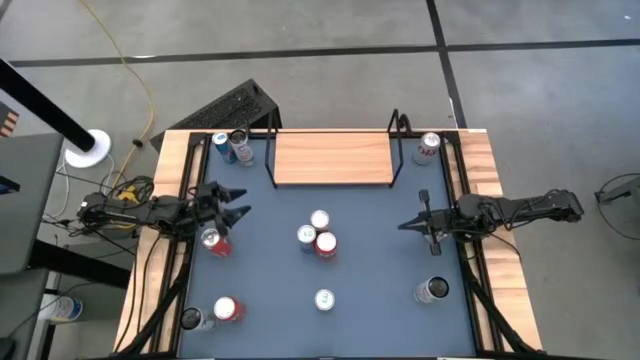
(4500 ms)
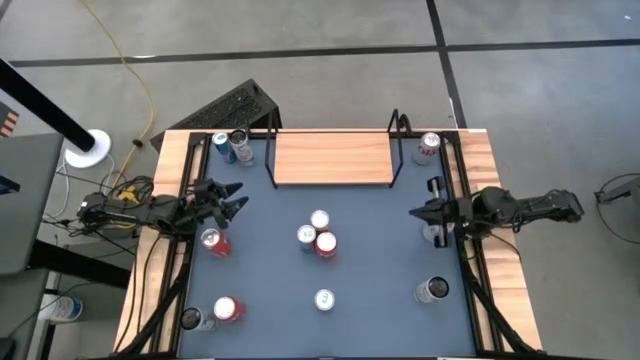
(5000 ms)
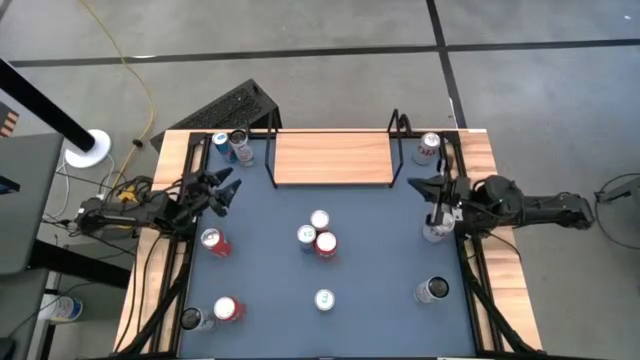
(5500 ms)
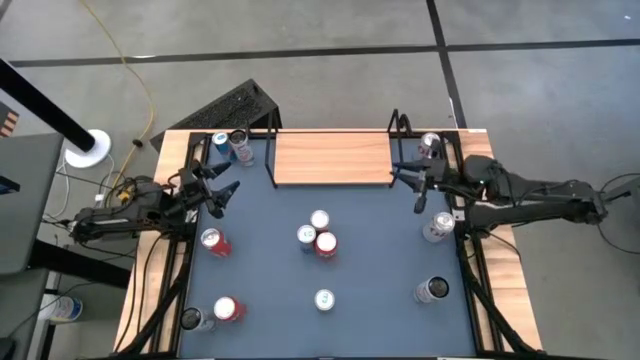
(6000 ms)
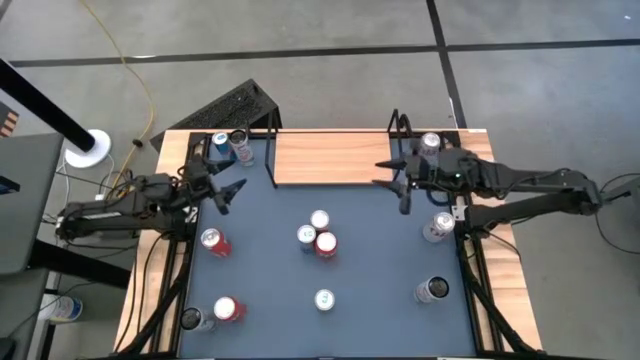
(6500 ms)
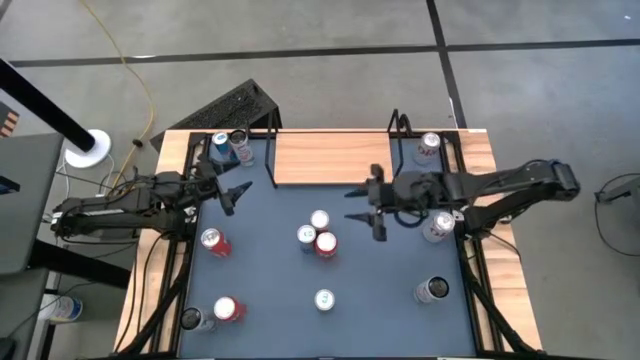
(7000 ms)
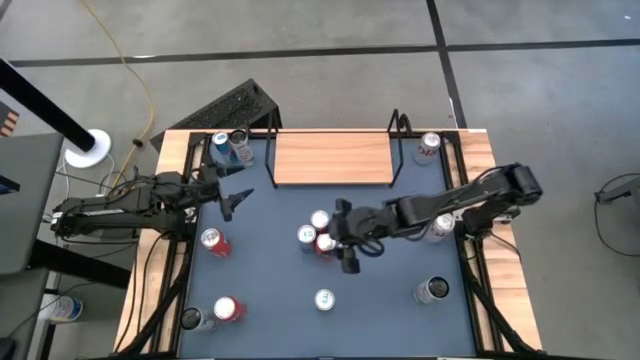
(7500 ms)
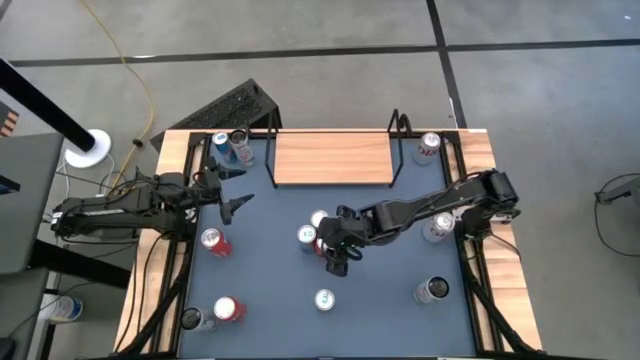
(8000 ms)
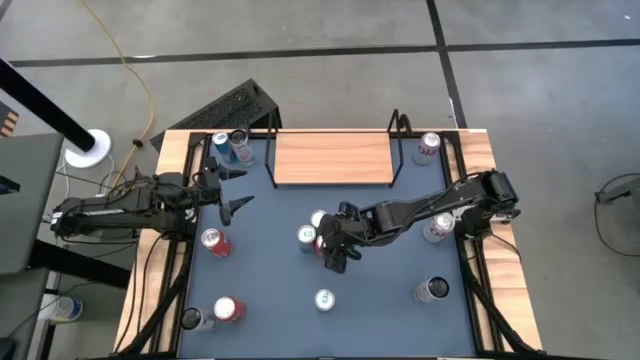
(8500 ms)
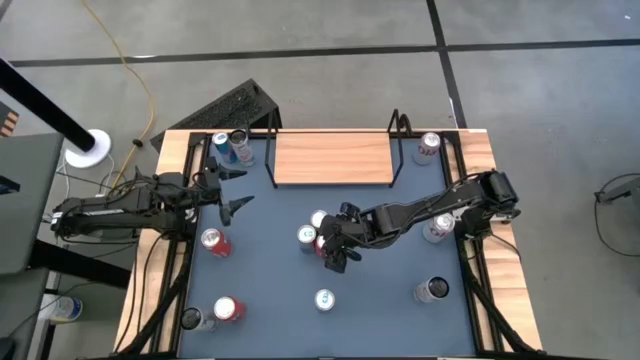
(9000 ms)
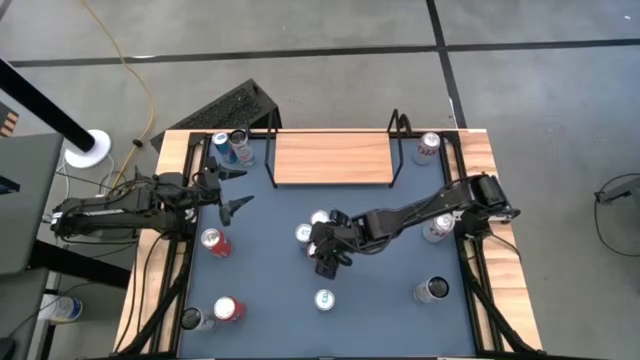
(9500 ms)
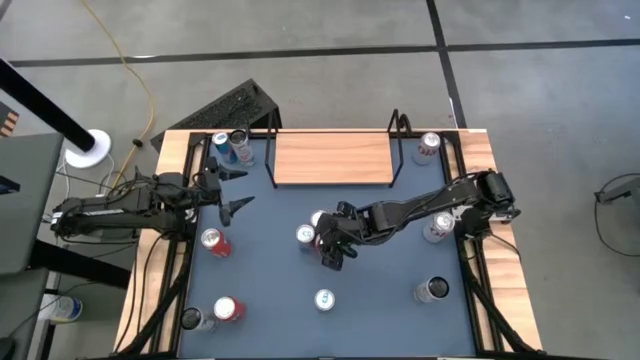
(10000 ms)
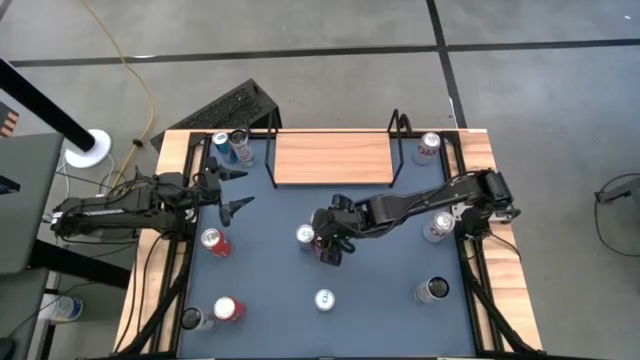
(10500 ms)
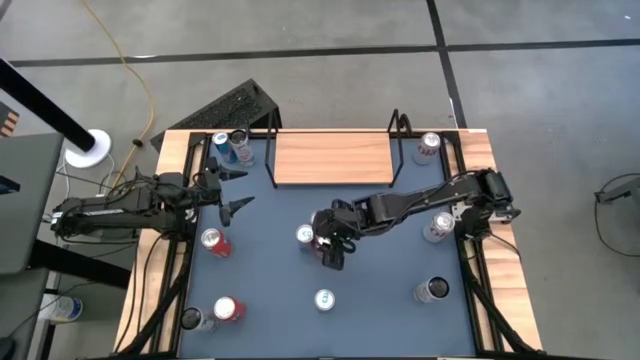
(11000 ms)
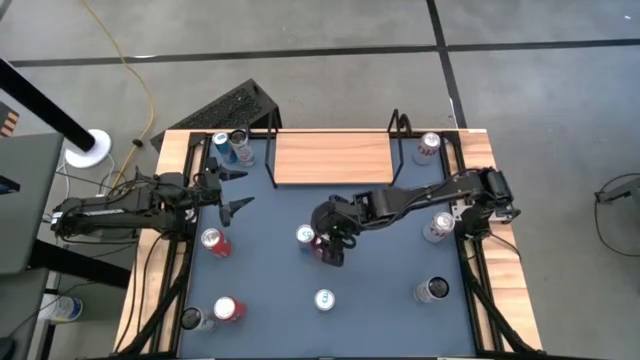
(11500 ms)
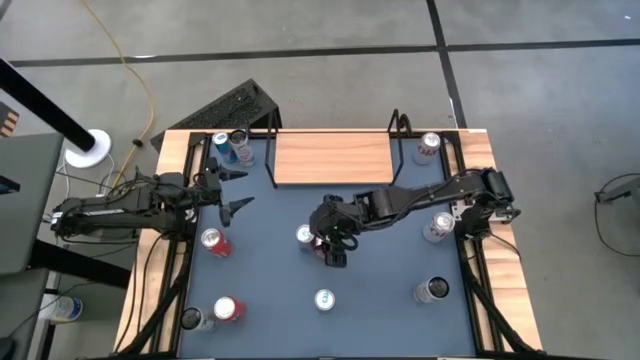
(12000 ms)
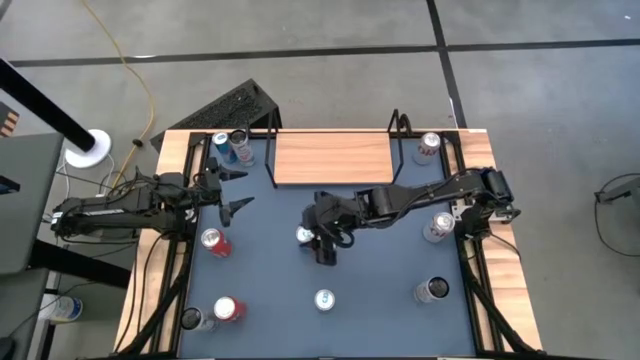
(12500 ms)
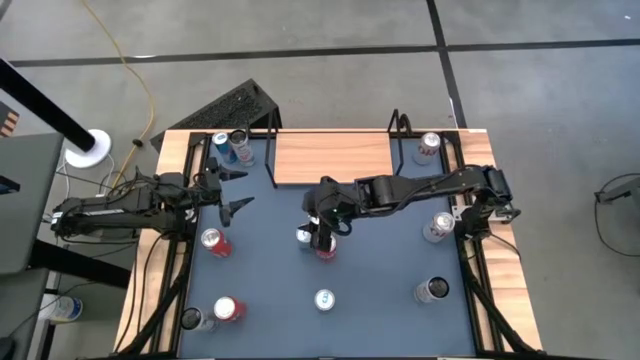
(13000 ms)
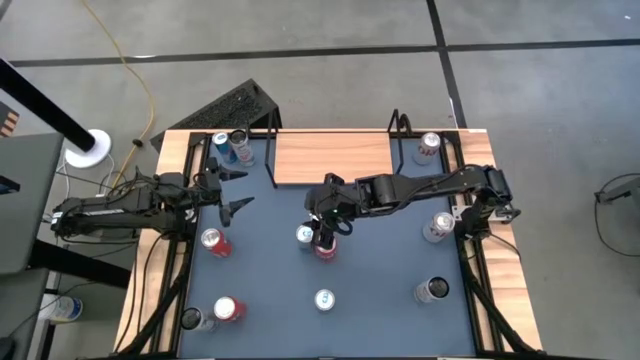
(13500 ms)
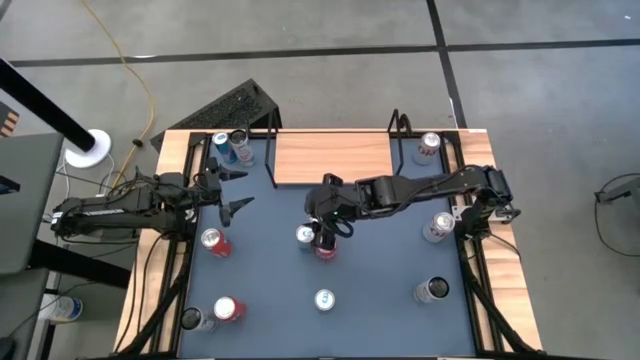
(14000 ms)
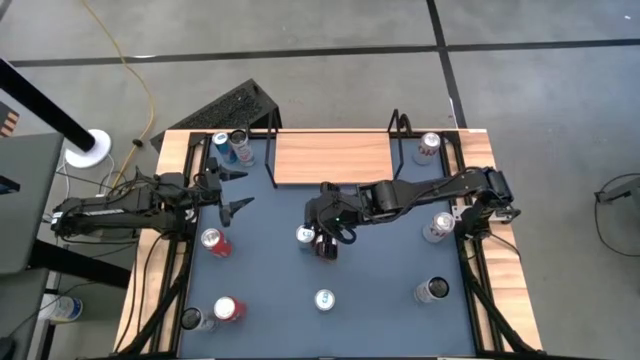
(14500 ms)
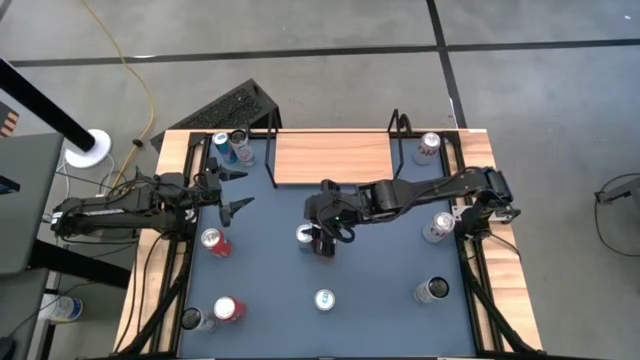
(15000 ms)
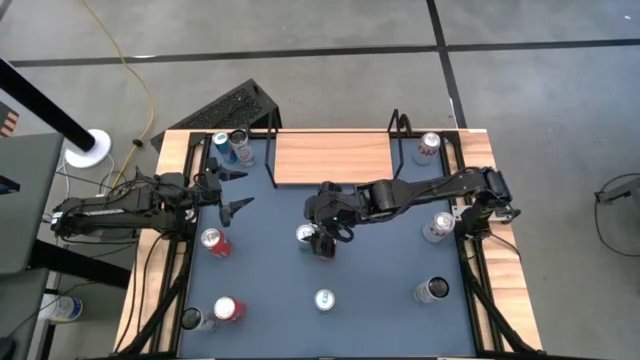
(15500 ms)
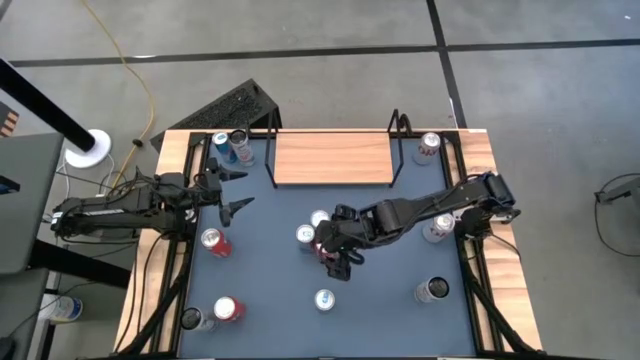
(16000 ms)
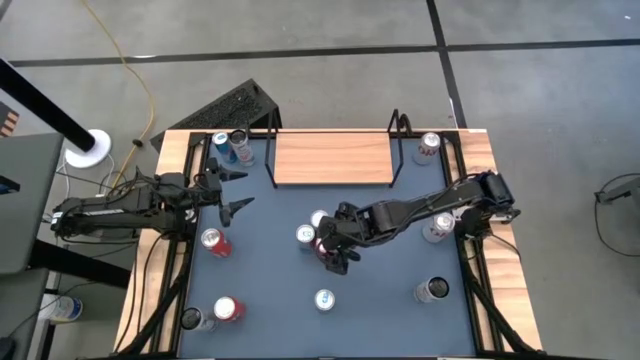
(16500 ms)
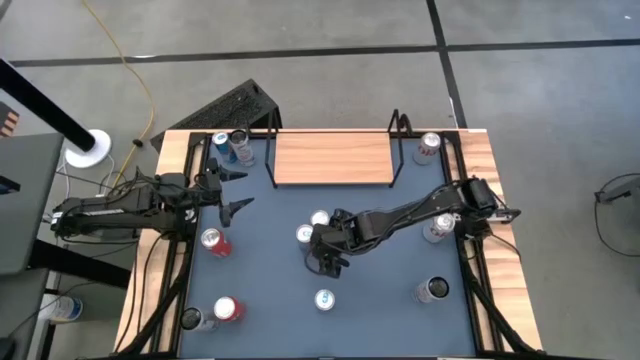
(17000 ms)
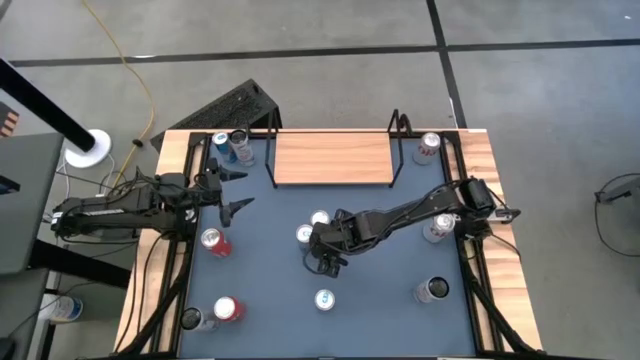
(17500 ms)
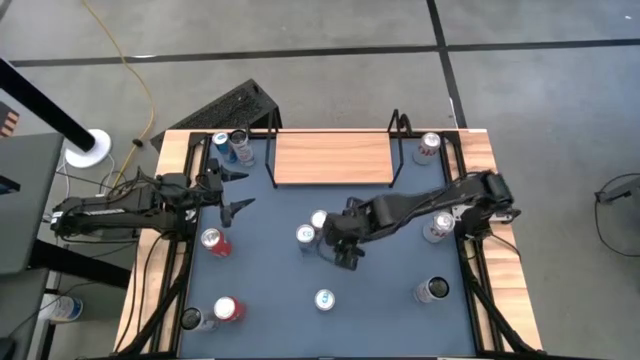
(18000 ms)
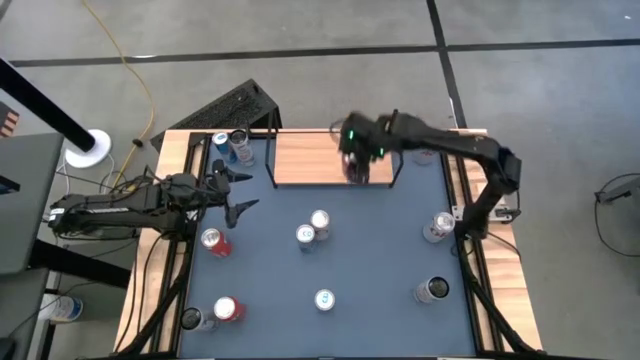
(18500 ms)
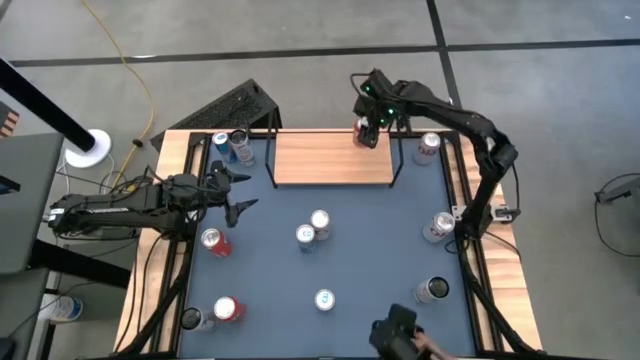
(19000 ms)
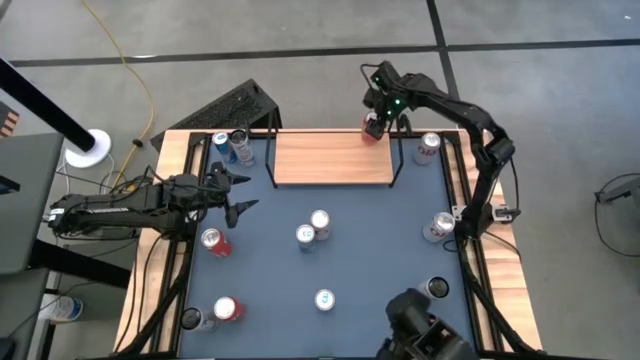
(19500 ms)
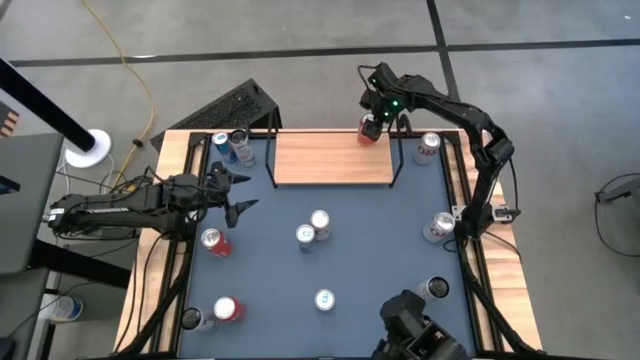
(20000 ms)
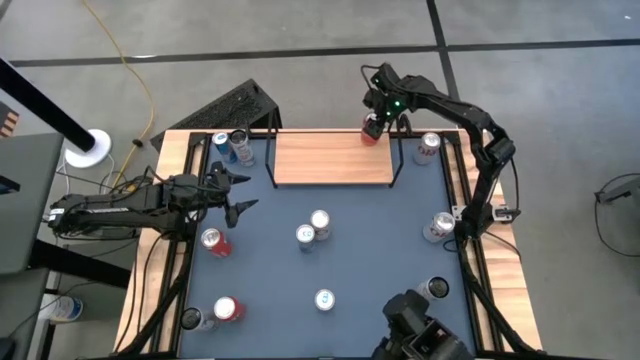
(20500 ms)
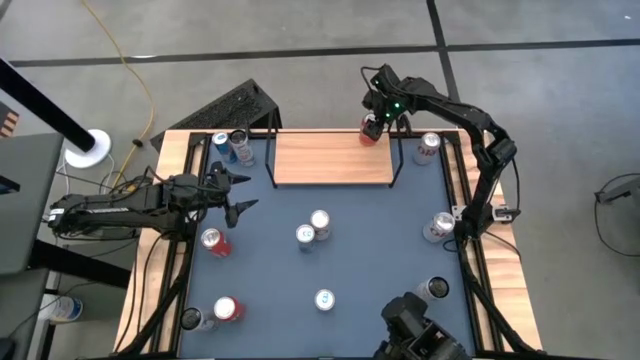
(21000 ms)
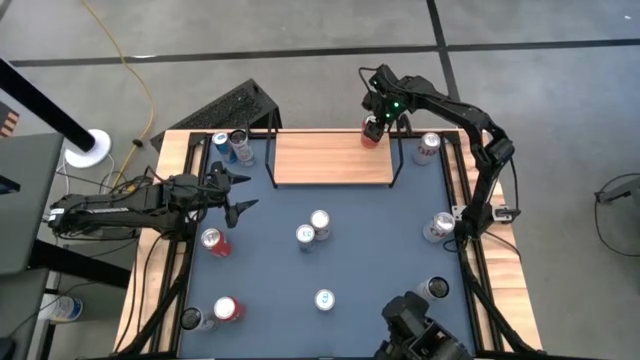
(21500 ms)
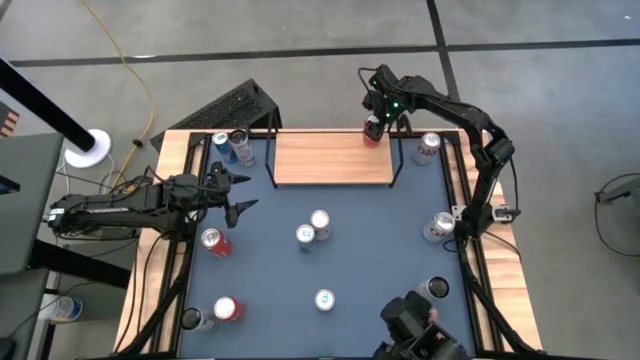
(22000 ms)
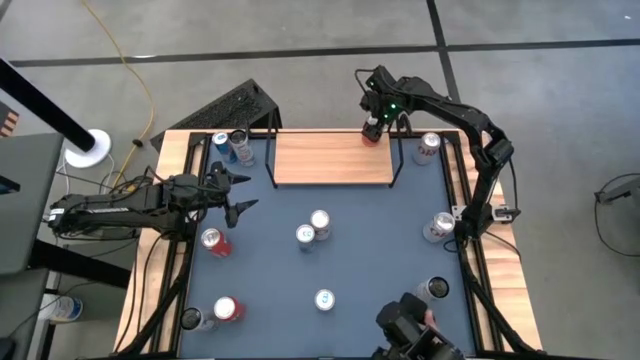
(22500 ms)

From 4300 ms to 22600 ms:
Task: Place canned beverage on shelf
Put the top right red soda can on the shelf
